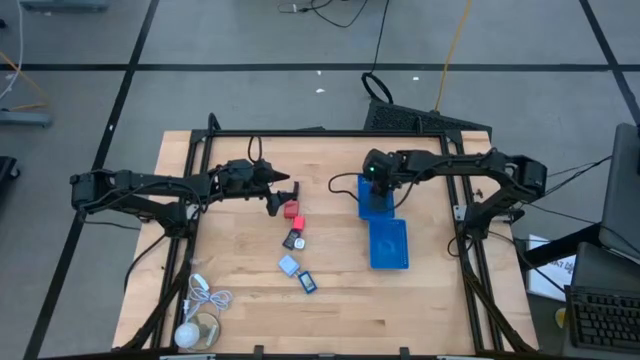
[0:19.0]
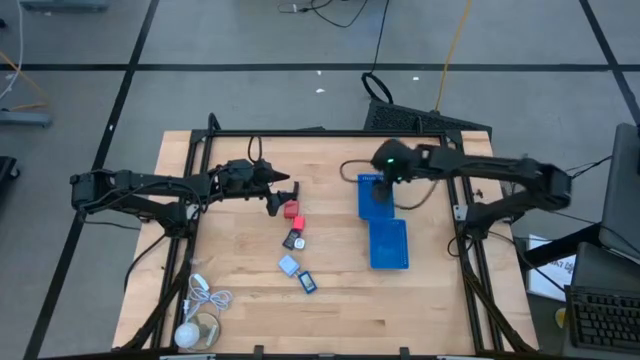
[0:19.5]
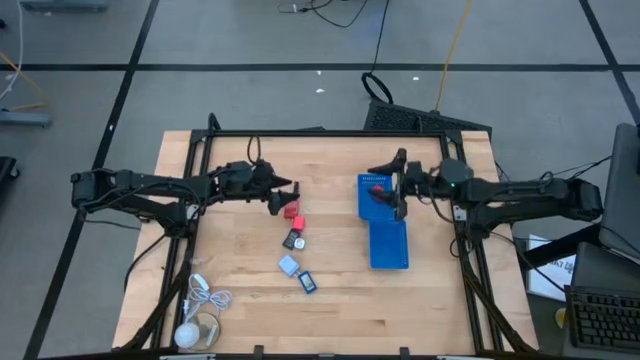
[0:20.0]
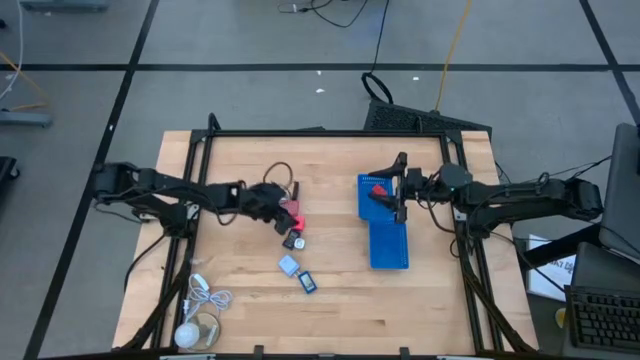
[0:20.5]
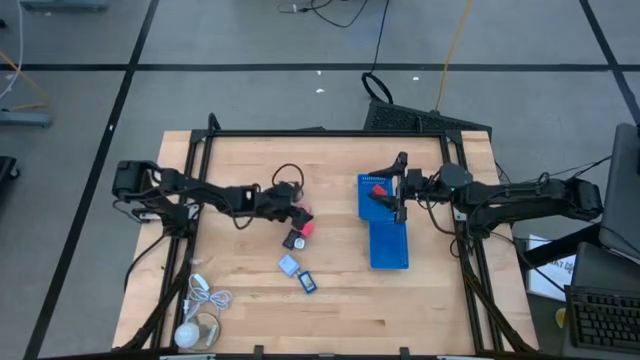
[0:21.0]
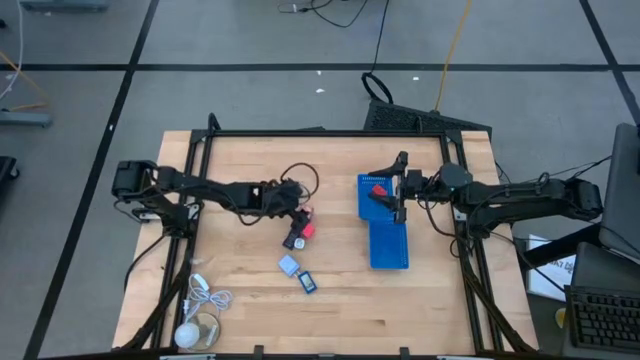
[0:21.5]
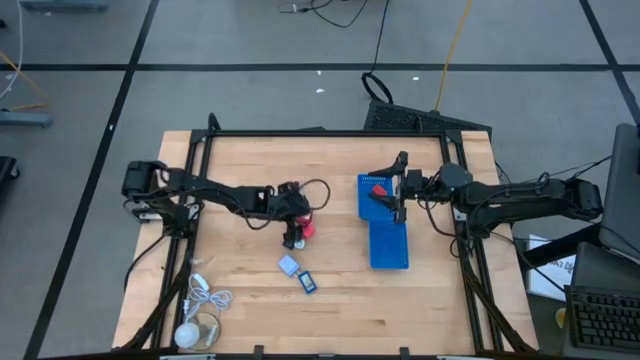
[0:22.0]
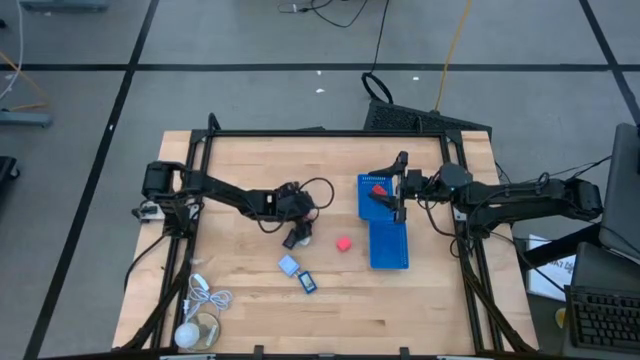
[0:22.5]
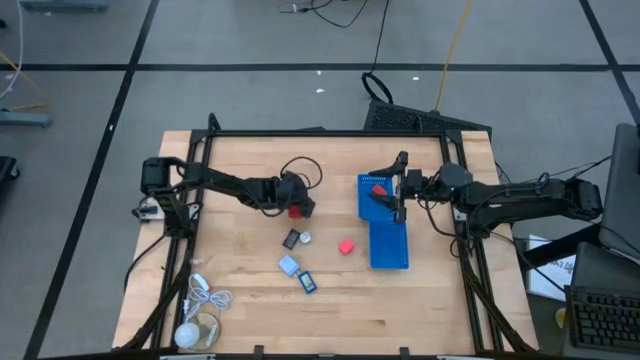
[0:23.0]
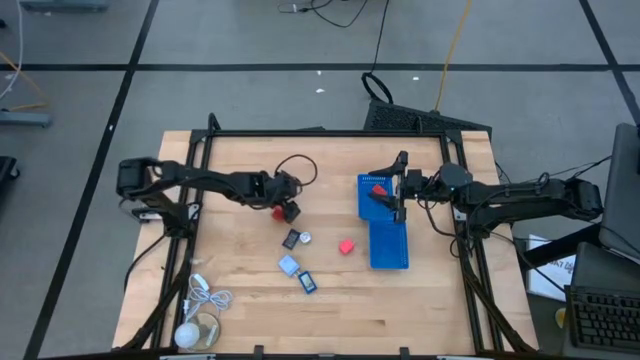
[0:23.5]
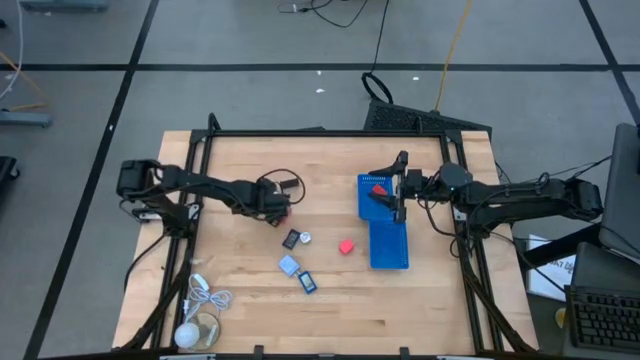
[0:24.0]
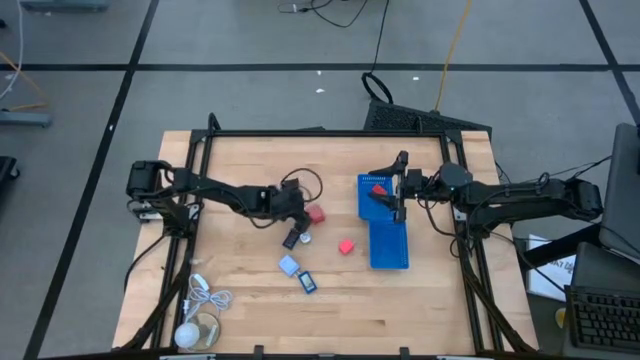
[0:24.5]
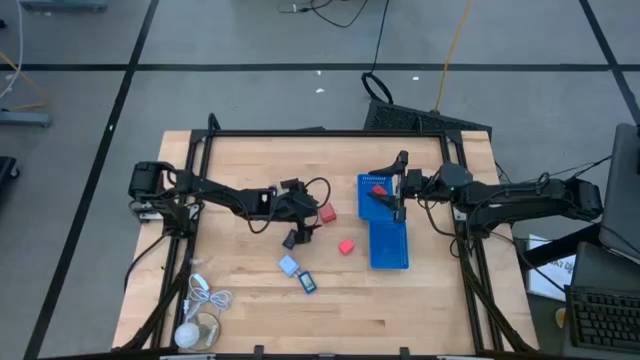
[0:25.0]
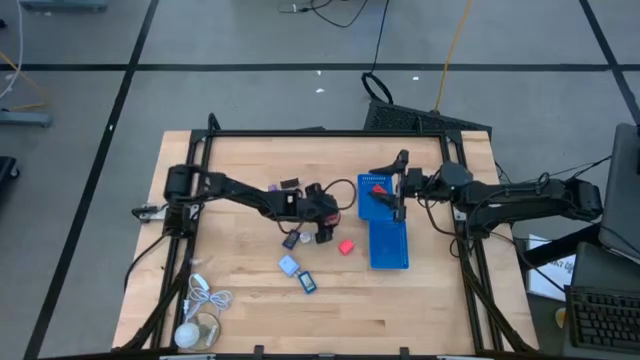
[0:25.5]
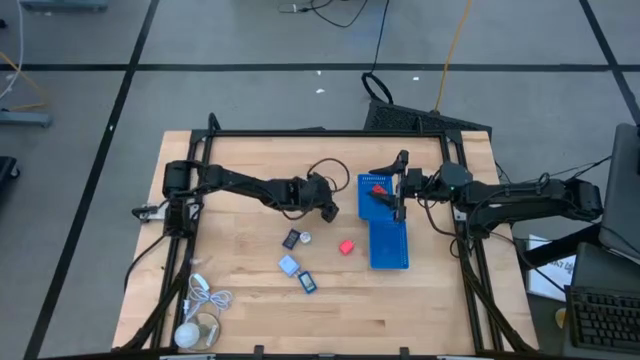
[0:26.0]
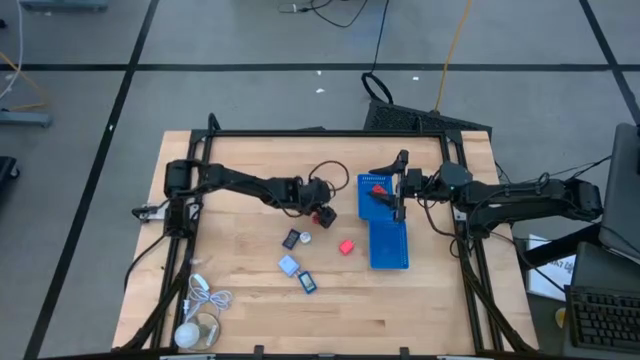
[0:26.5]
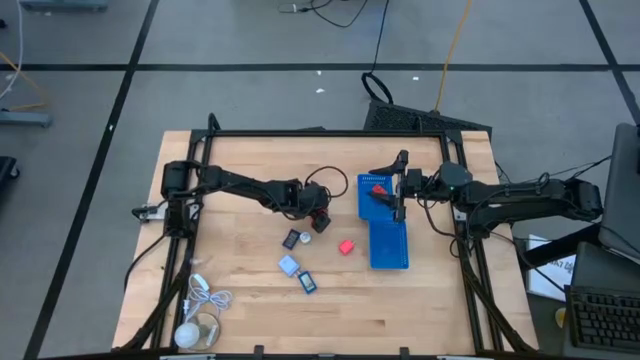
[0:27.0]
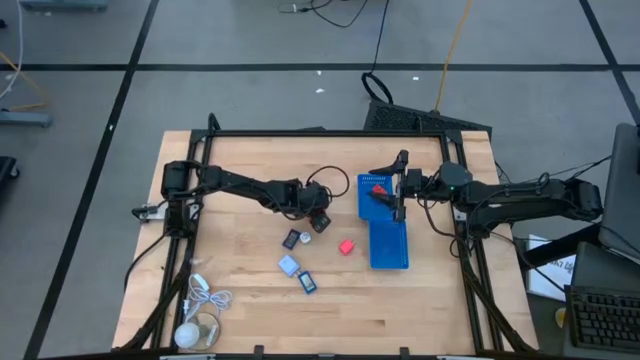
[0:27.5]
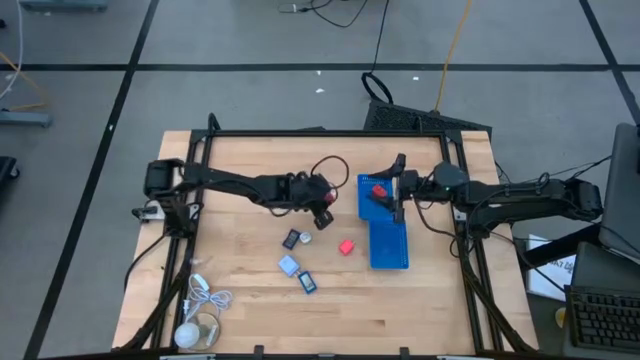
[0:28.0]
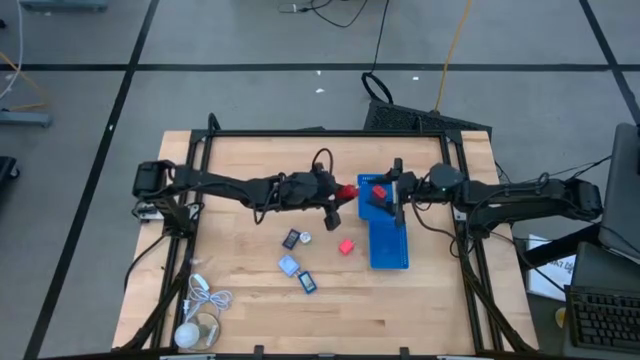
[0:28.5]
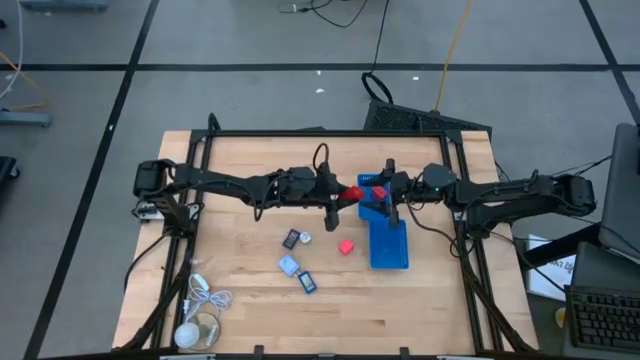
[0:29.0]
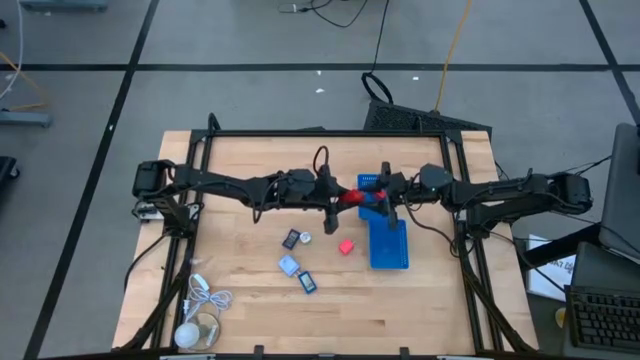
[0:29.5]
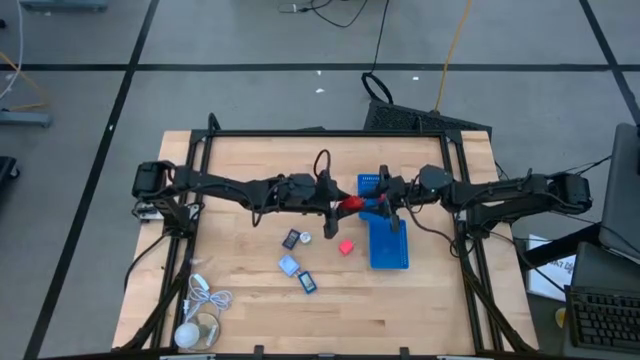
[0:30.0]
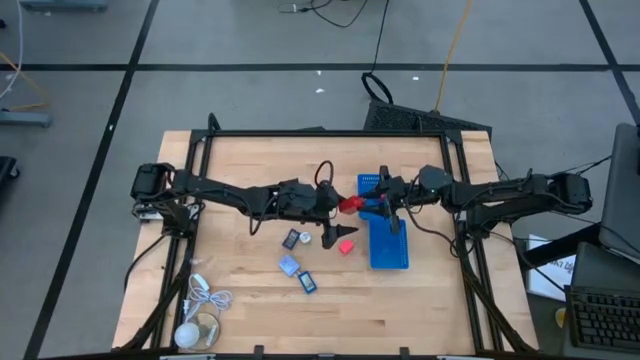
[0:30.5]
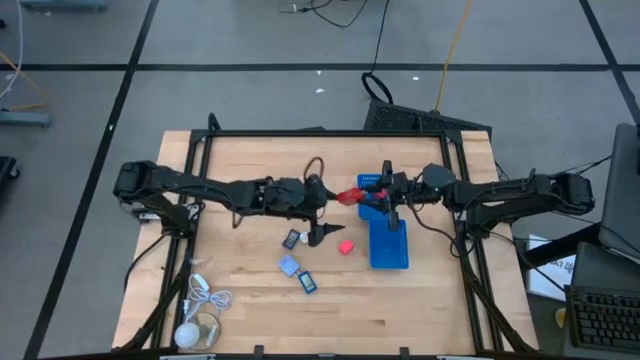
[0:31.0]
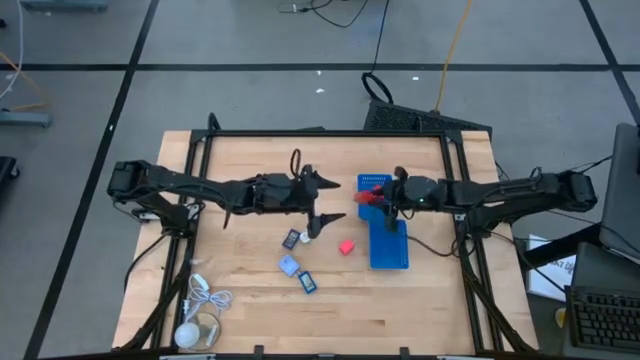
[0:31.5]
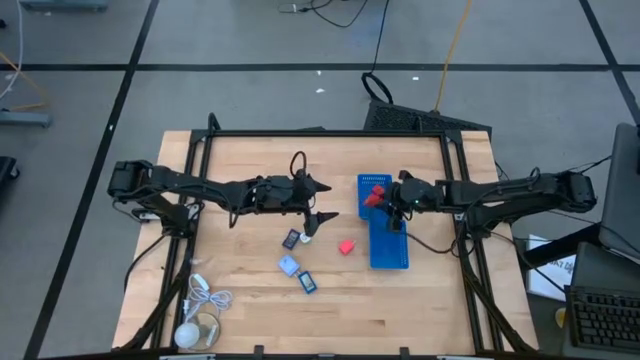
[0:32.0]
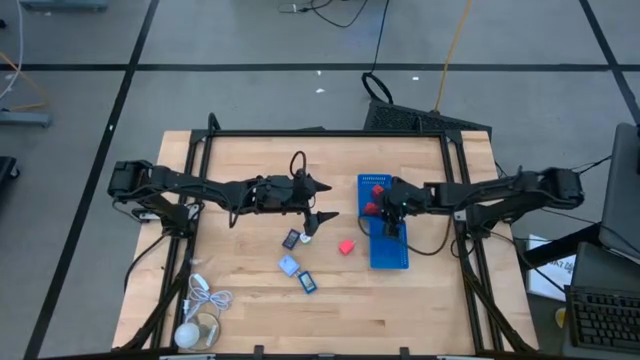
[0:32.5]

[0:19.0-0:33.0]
Task: Pick & Place Office items
Put the red charger adapter into the top blue bin

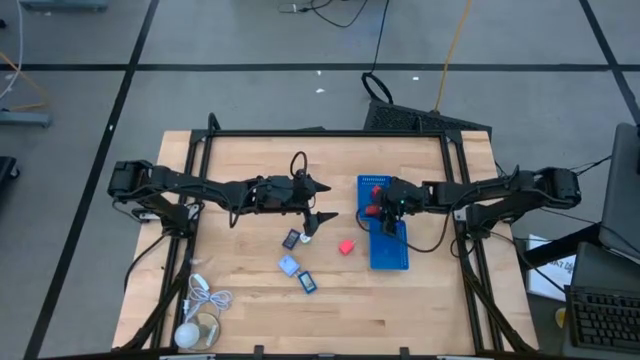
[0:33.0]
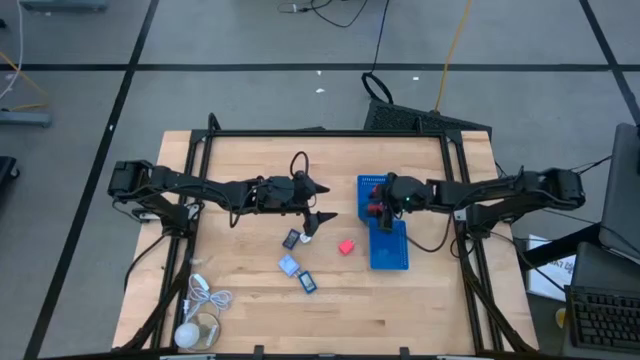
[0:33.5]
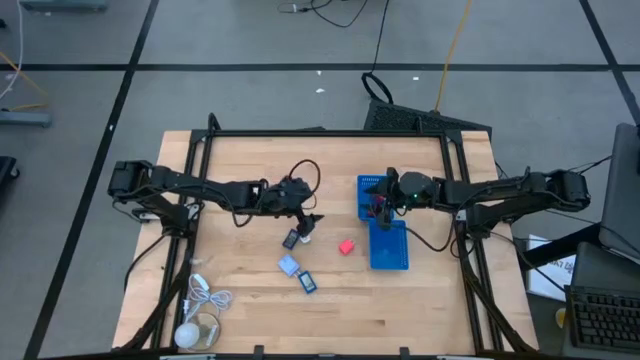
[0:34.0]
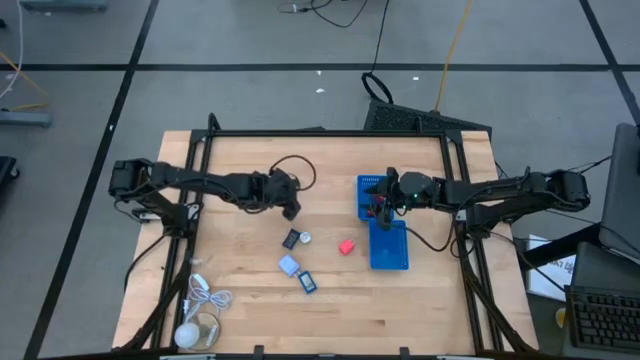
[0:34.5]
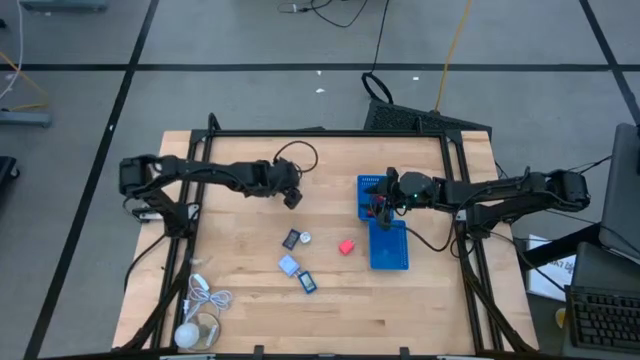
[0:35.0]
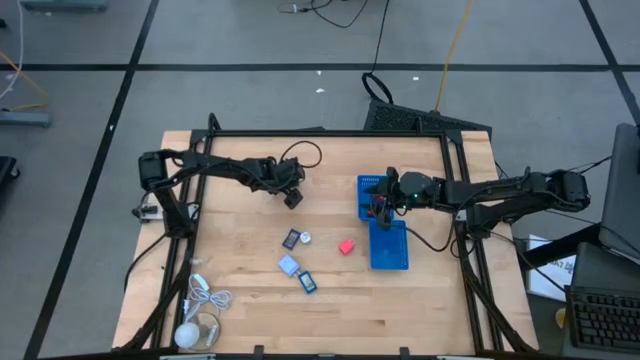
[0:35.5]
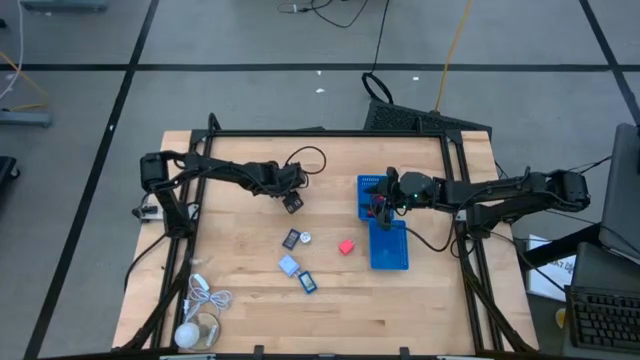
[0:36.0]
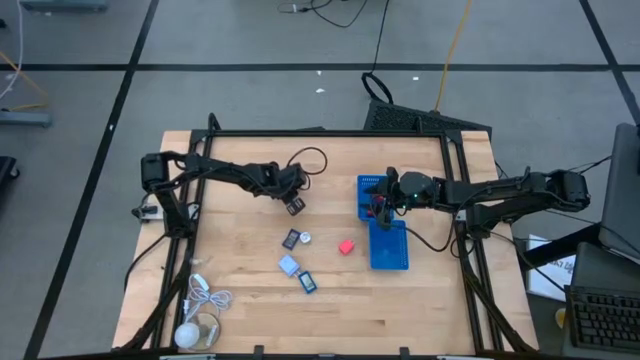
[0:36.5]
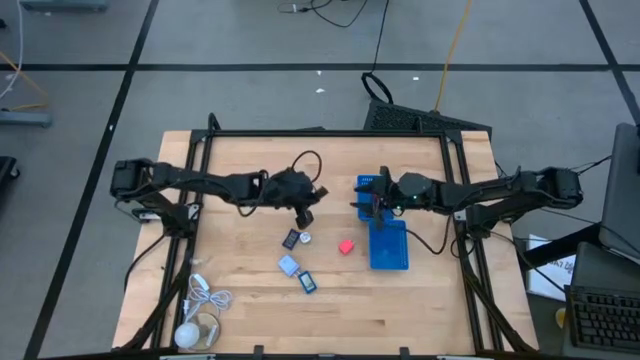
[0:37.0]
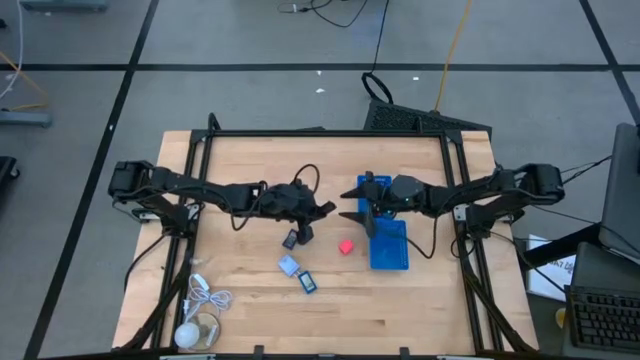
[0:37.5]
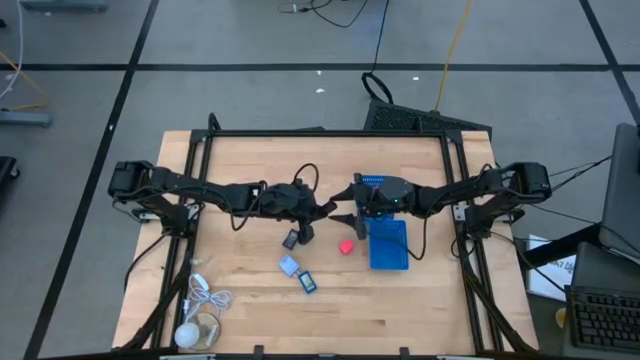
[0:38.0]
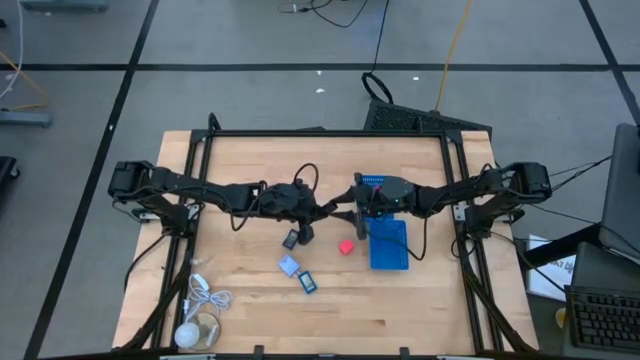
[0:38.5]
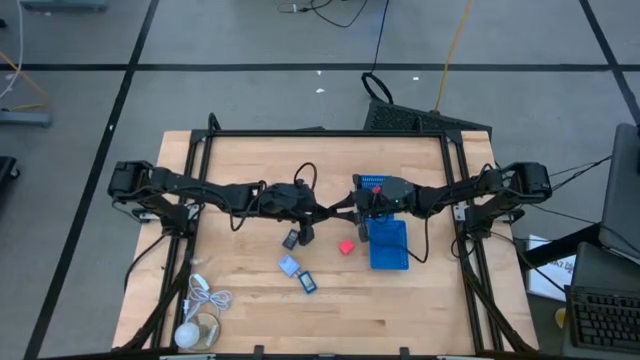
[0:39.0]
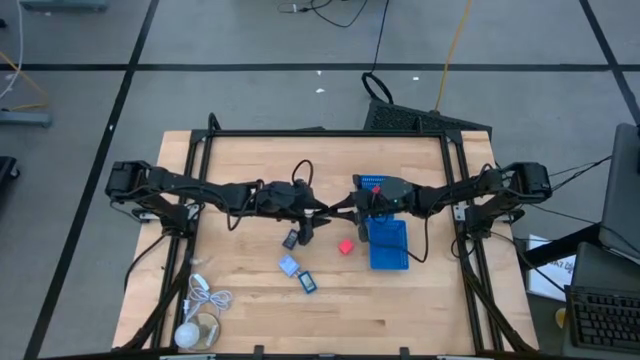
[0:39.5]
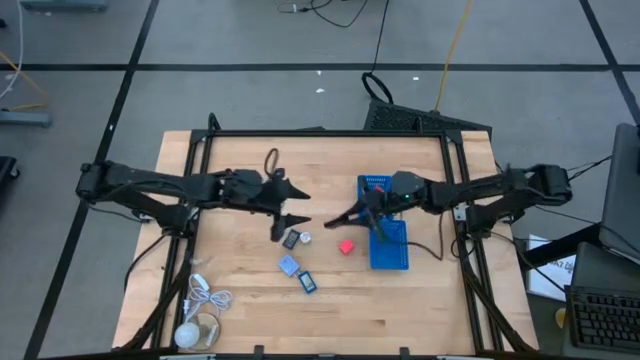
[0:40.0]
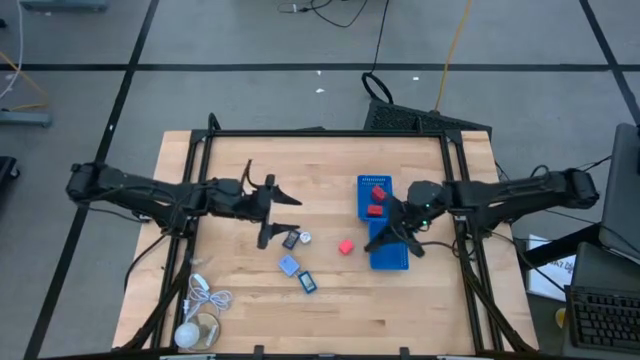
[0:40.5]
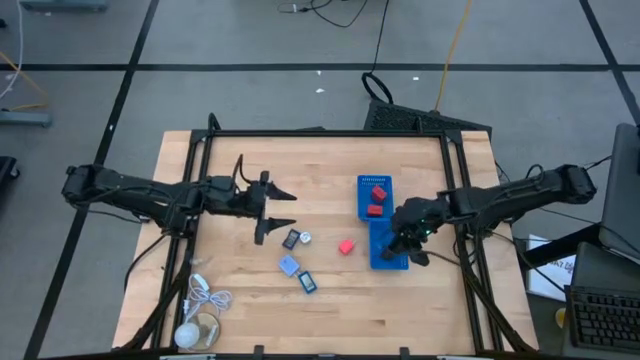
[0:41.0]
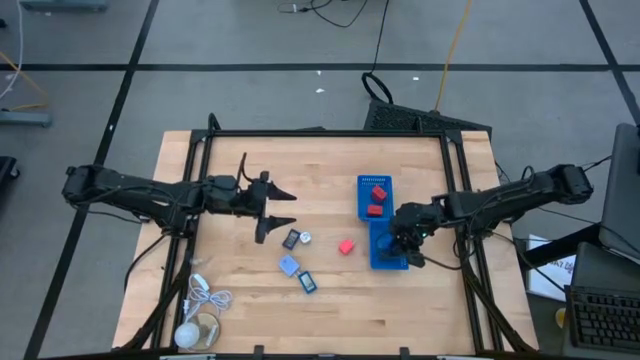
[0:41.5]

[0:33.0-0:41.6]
Put the black digital timer into the bottom blue bin
